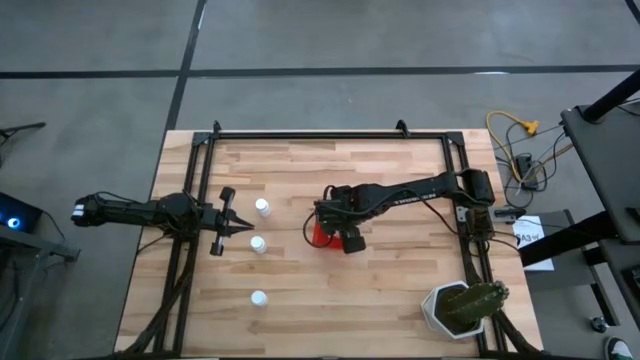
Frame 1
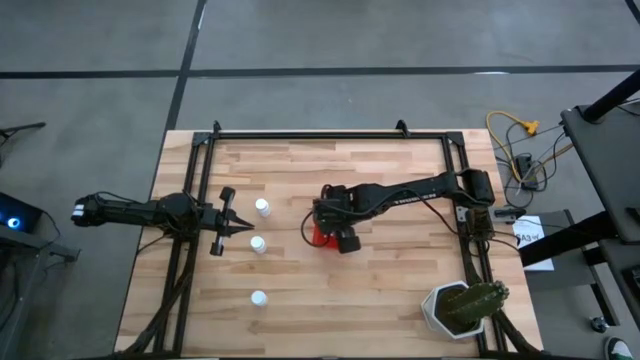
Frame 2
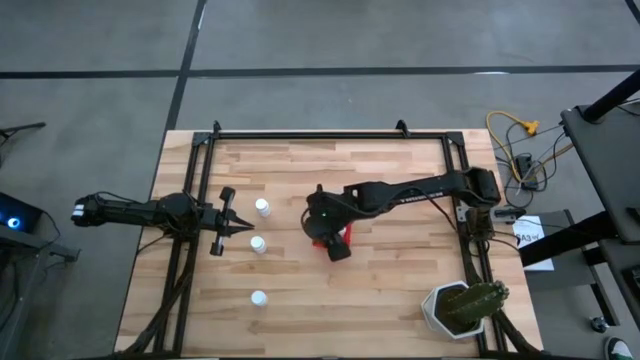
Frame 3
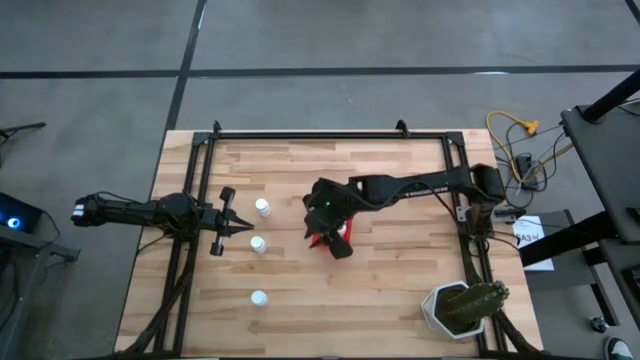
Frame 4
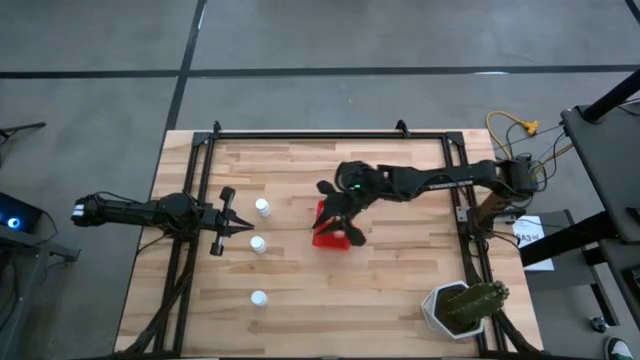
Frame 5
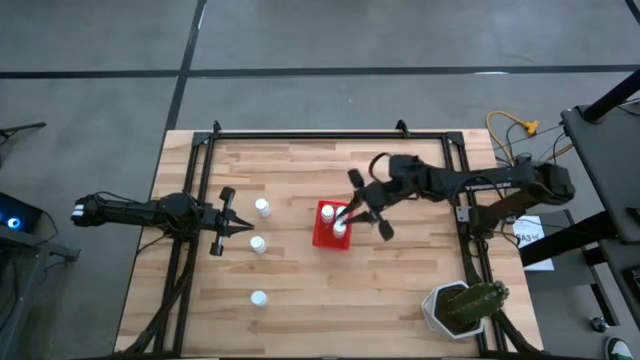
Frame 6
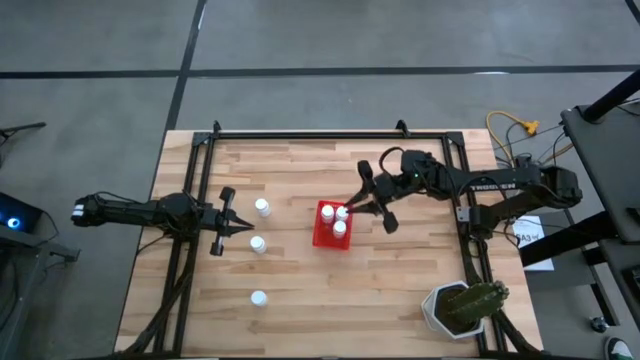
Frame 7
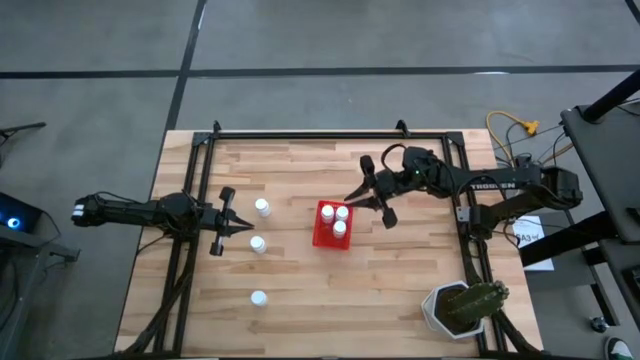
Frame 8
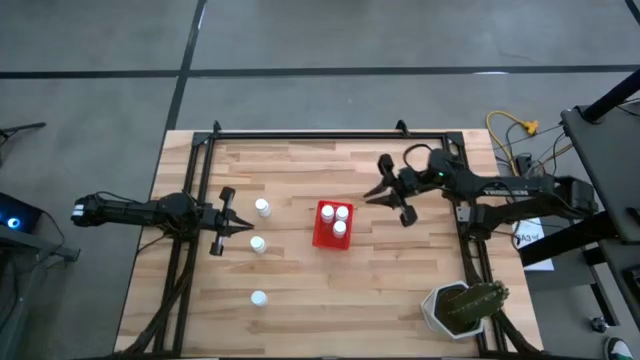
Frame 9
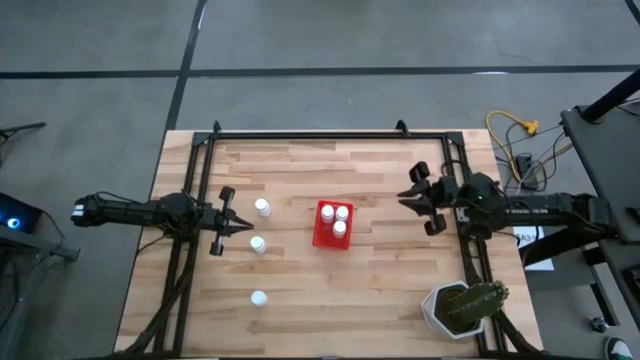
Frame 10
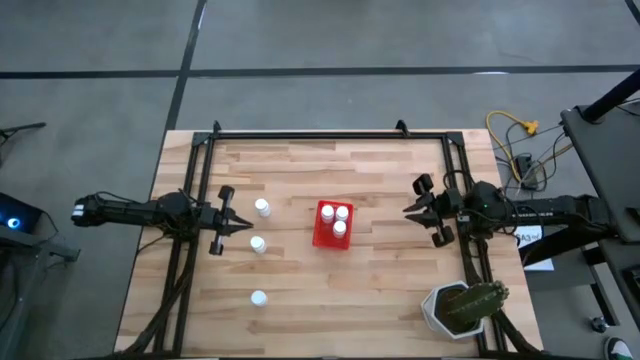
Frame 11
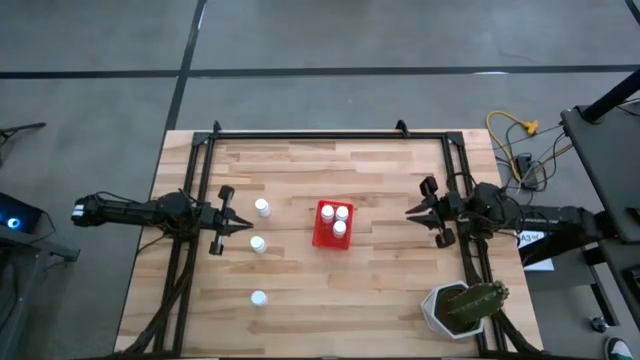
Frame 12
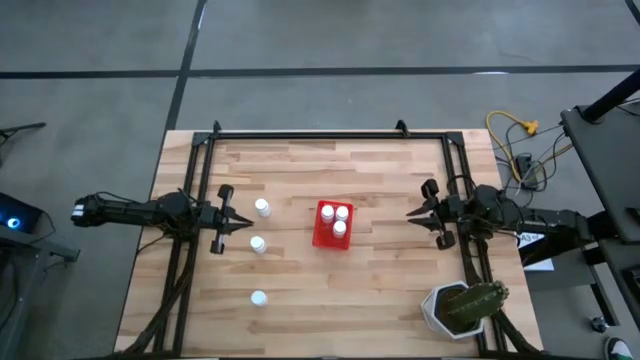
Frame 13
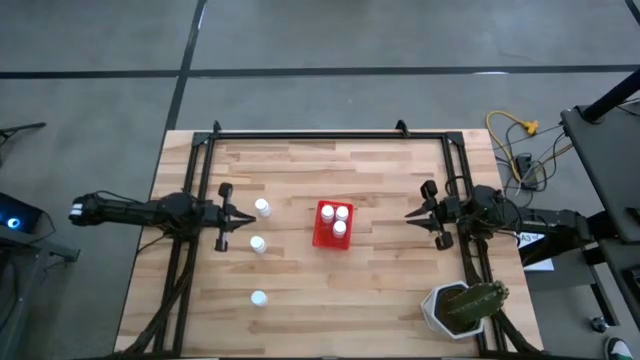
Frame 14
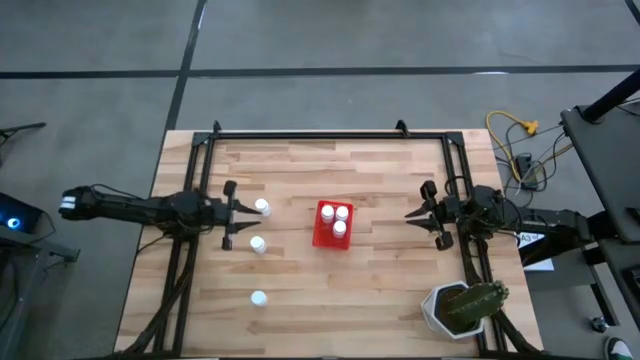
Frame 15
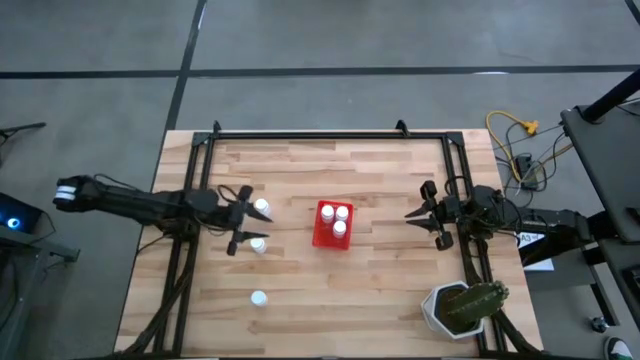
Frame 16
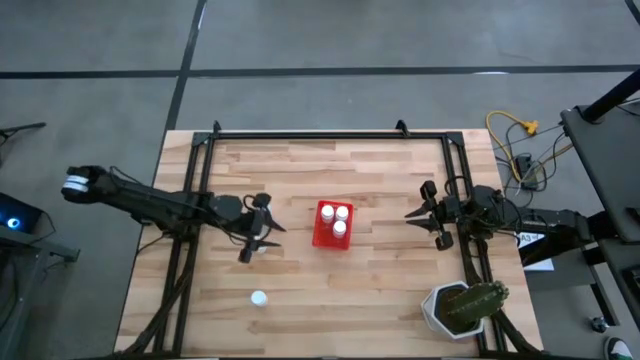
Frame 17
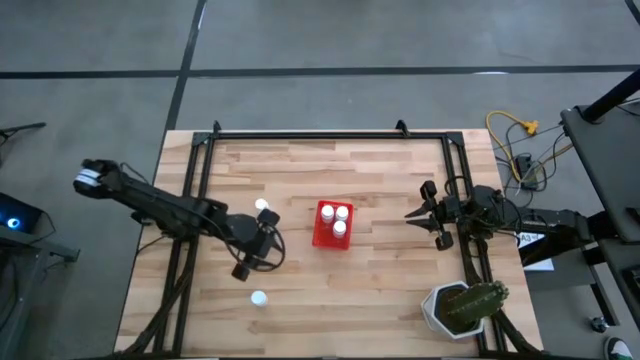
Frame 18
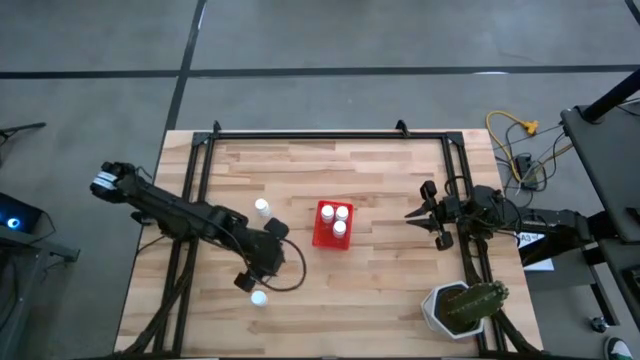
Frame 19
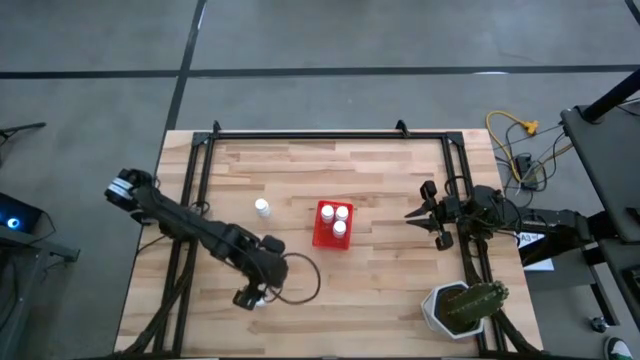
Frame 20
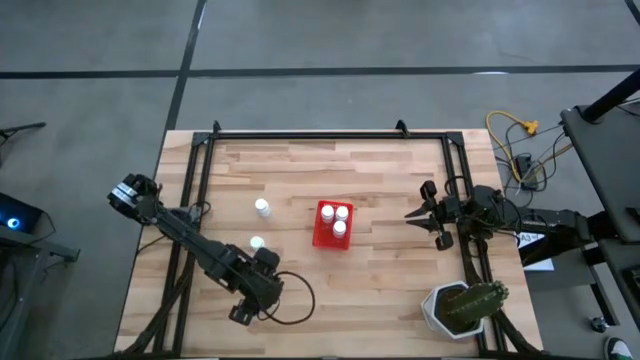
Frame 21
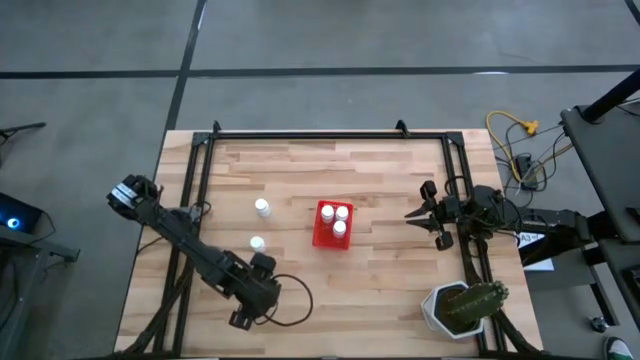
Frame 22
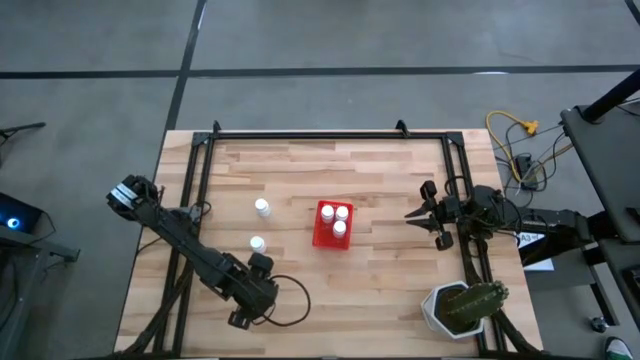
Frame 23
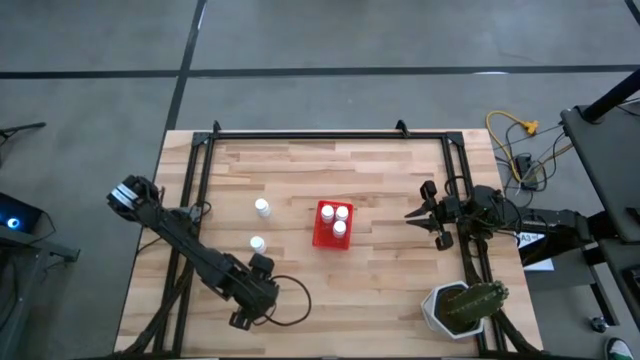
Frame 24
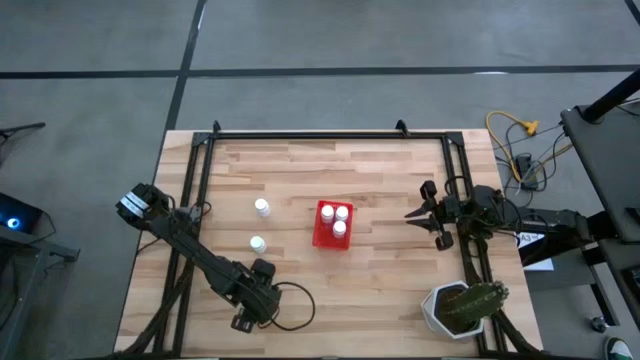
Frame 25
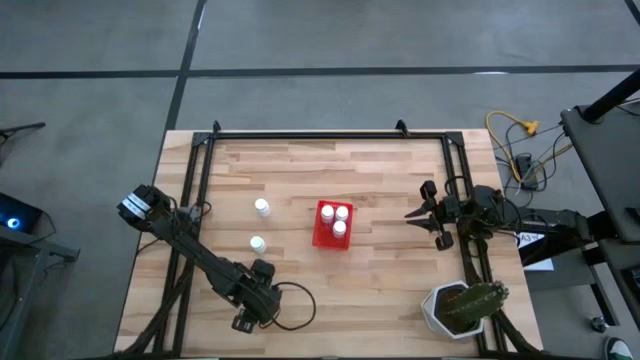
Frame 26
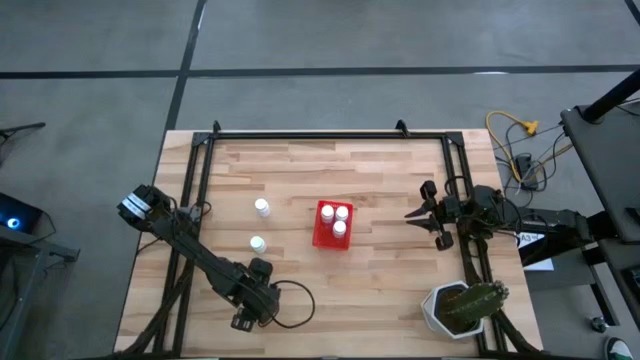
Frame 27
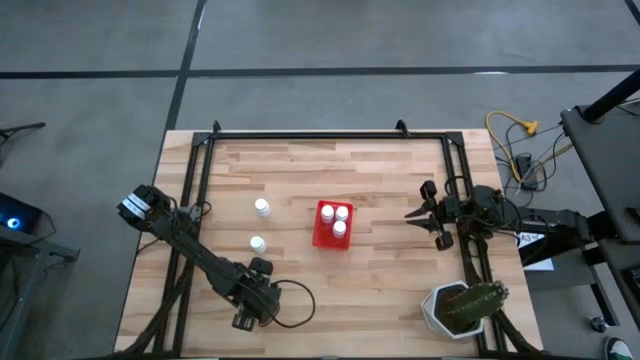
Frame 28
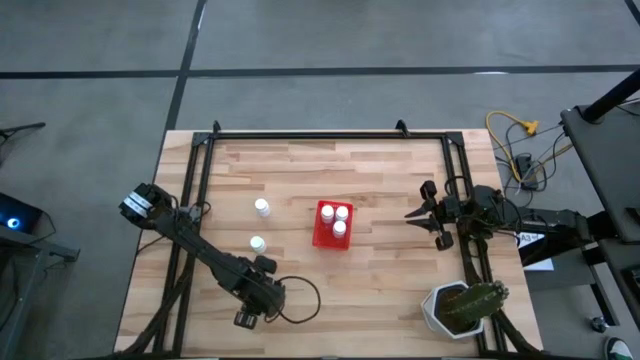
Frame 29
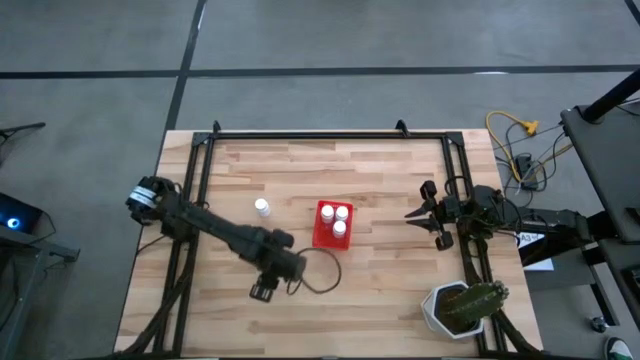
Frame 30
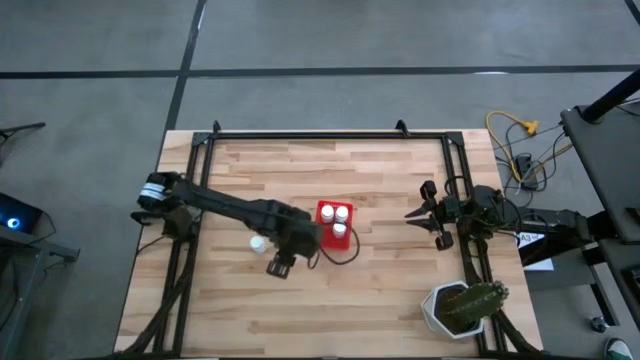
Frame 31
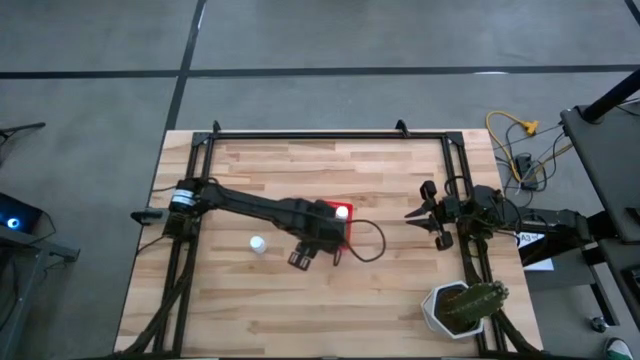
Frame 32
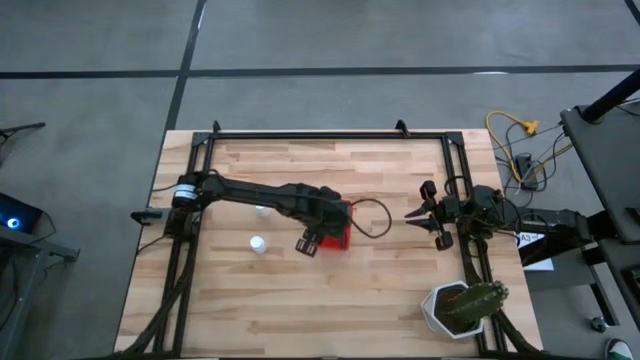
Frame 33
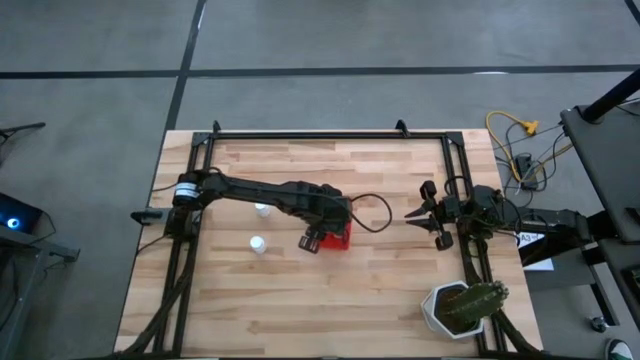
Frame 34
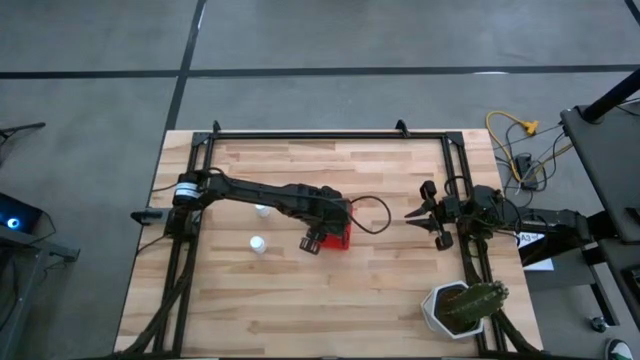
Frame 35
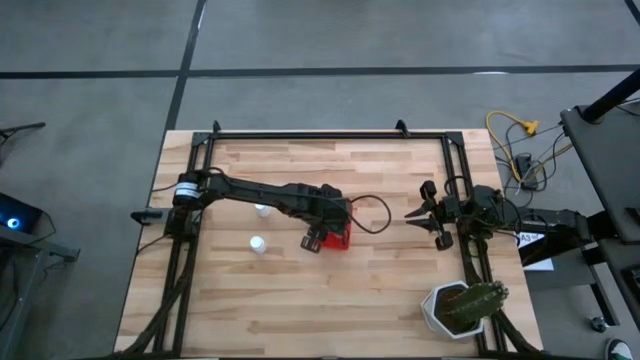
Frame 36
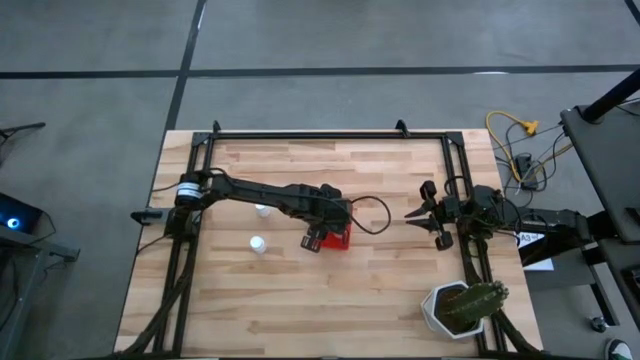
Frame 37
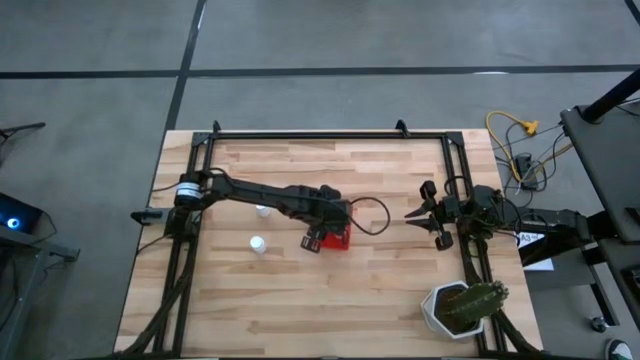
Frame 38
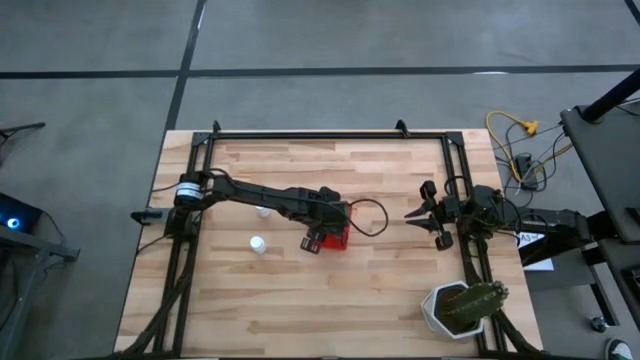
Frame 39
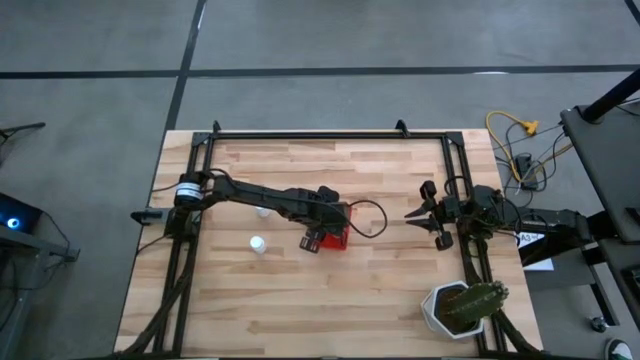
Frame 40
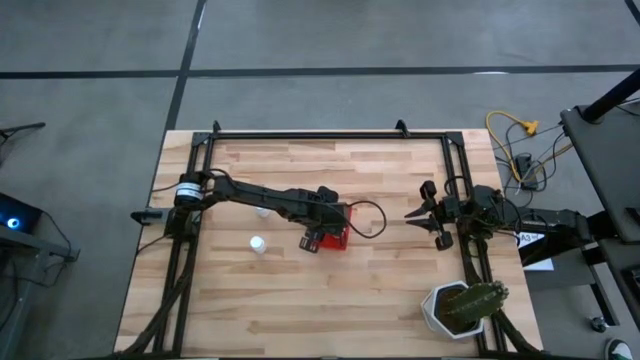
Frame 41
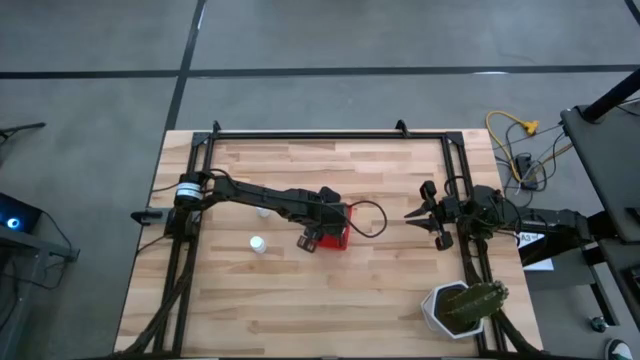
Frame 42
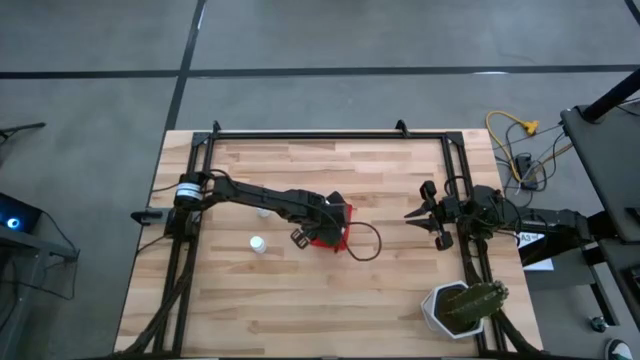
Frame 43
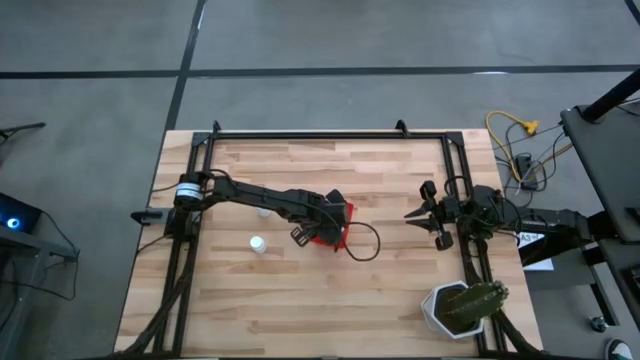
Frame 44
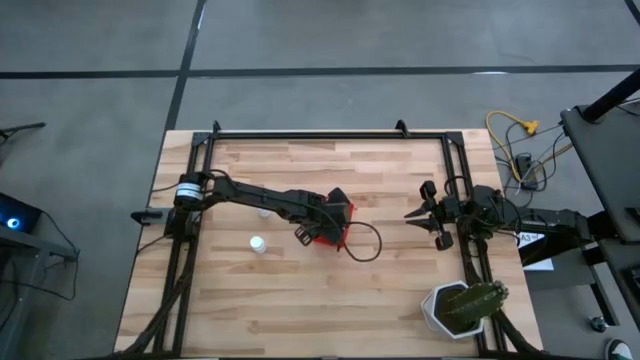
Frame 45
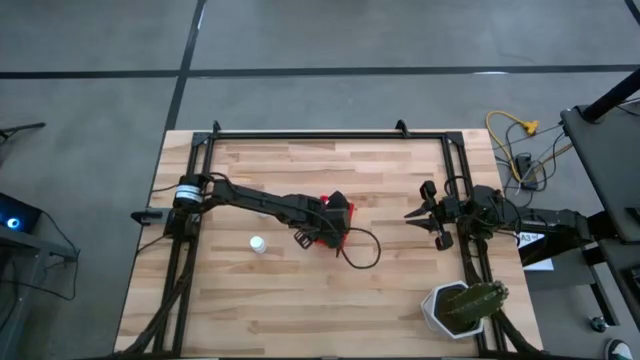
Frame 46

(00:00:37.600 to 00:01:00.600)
Task: Pick and place pill bottles into a basket
Put the white medicine bottle into the red bin
